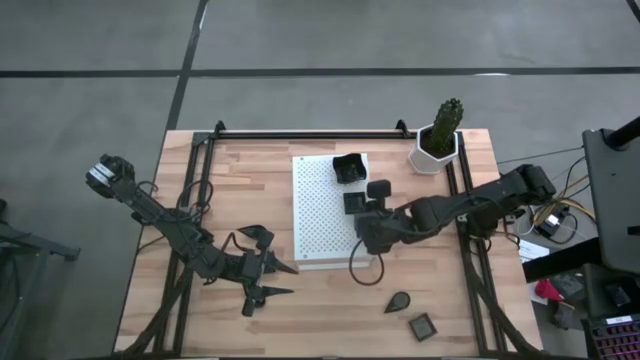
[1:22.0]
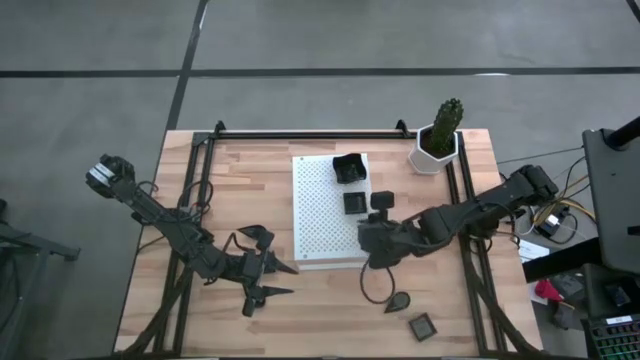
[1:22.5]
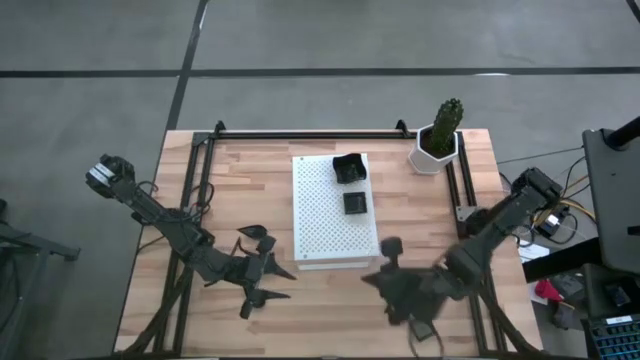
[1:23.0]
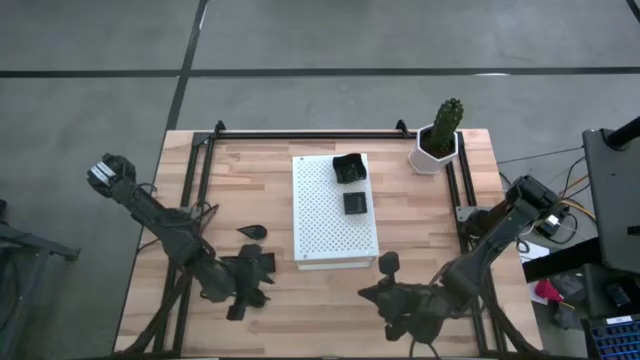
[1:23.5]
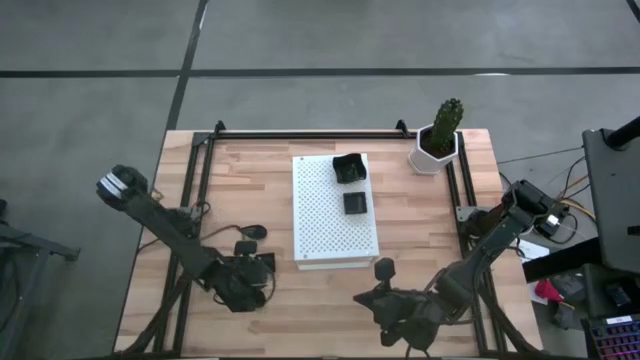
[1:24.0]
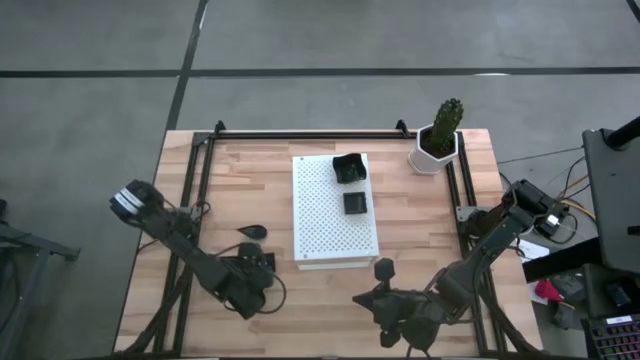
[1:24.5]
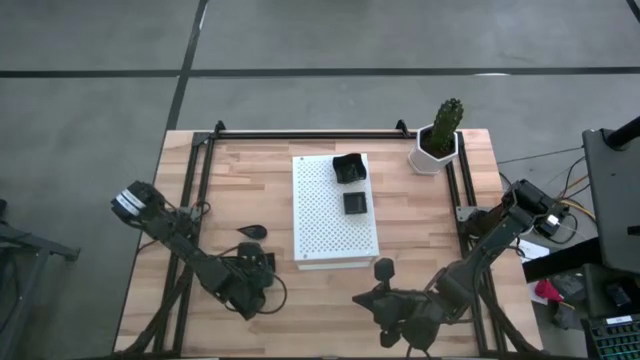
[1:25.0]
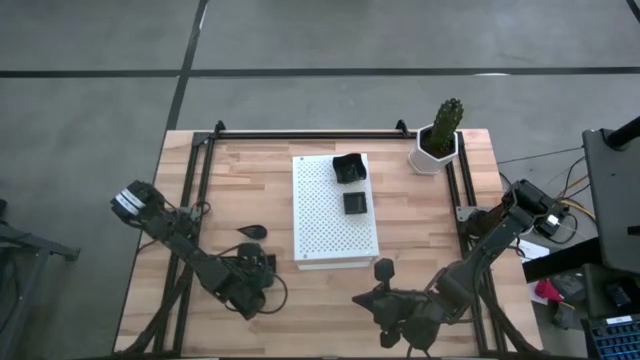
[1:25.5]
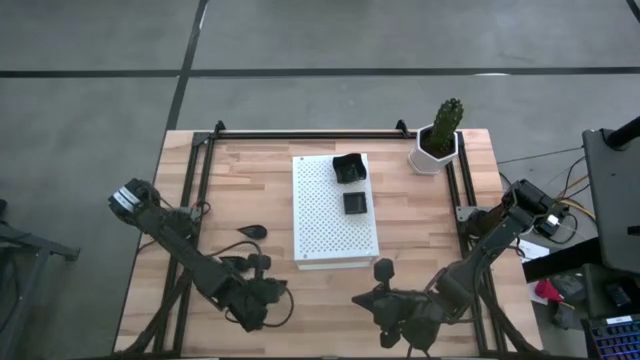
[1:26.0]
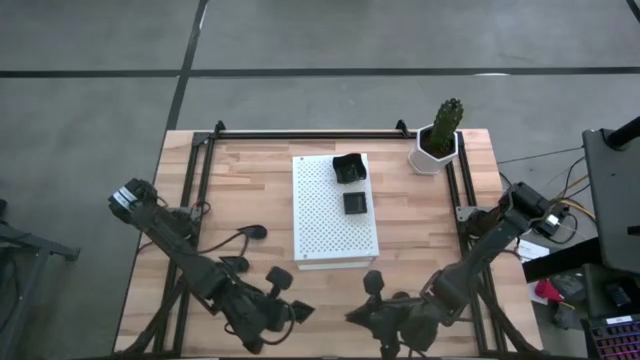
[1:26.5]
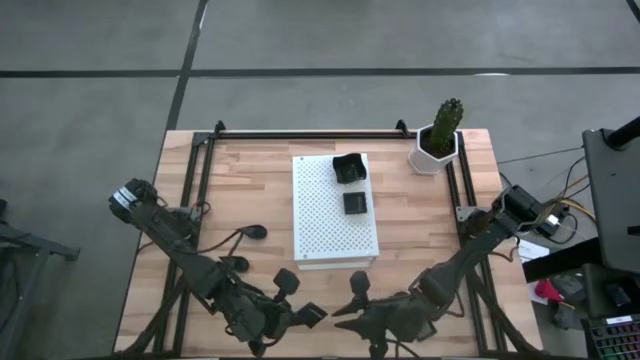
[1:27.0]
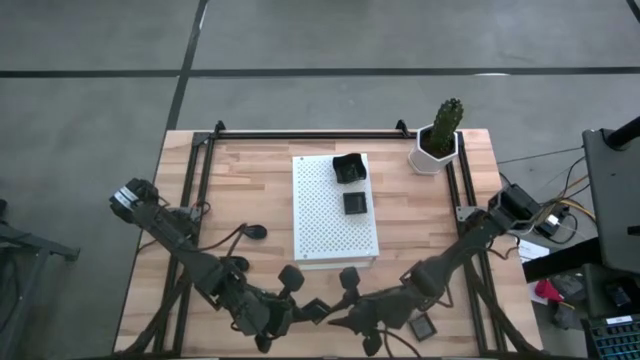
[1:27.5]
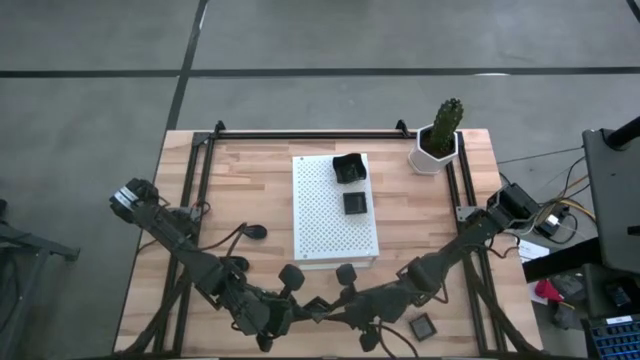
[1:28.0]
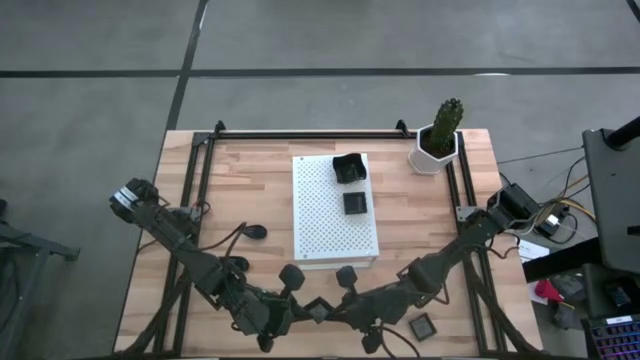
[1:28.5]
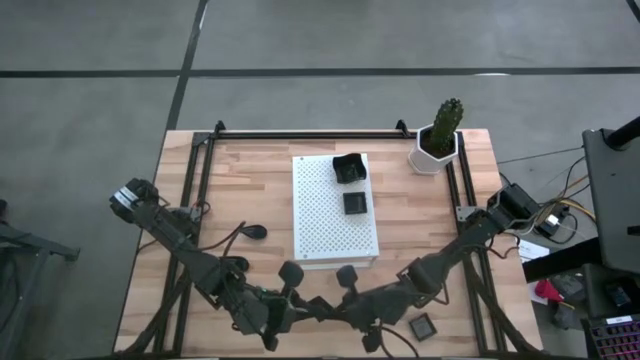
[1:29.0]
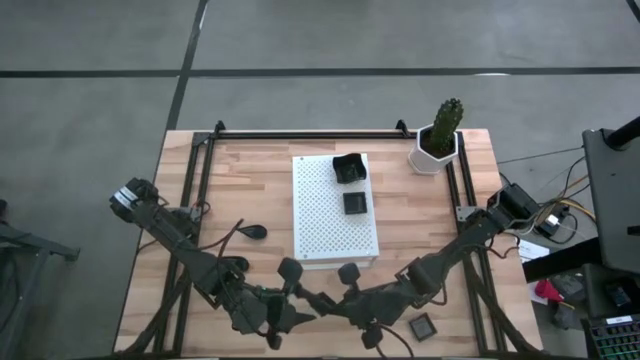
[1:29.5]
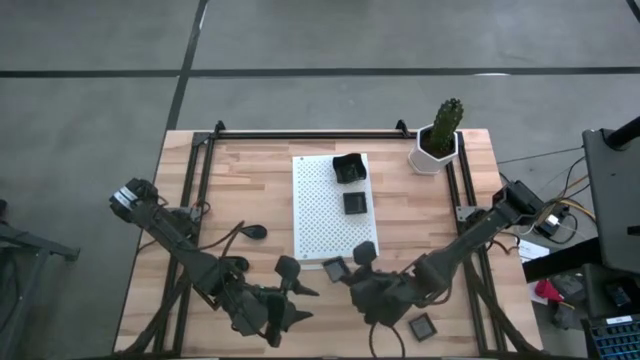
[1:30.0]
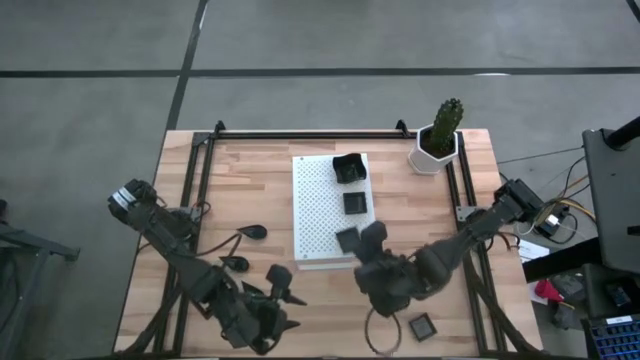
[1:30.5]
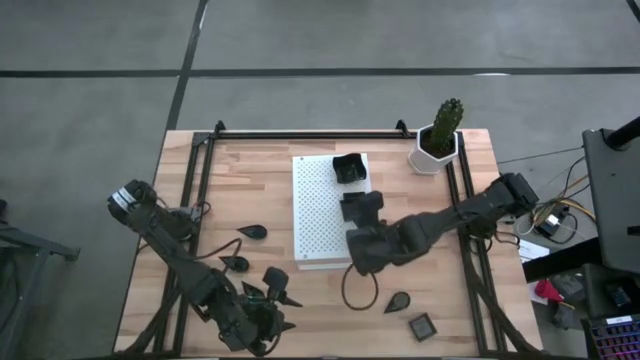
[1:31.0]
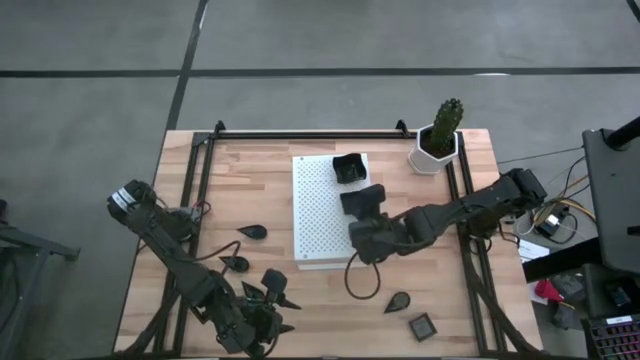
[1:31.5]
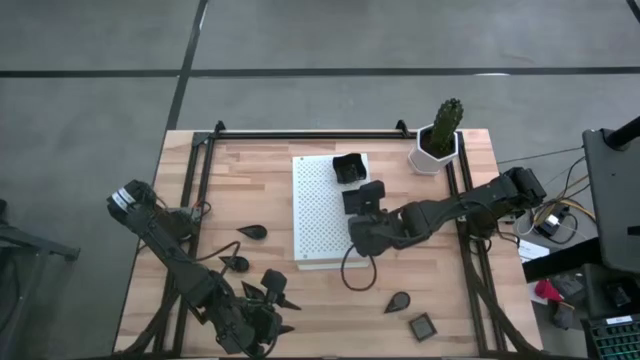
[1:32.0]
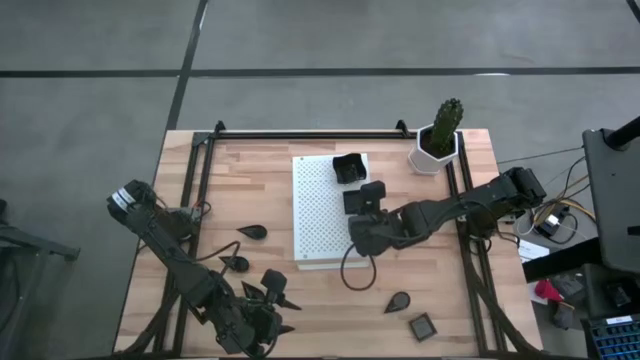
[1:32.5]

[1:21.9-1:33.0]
Task: Pick & Place Mini shaped plates
Stack the black square plate on top of the black square plate on the shelf

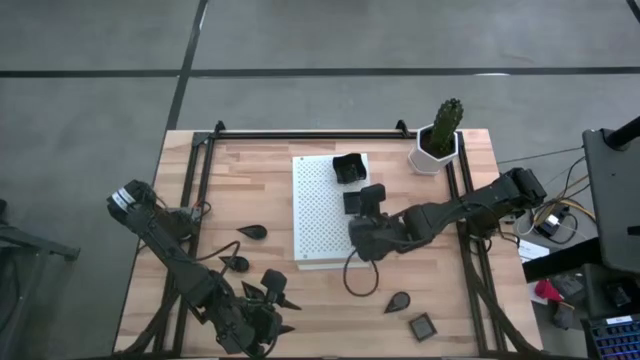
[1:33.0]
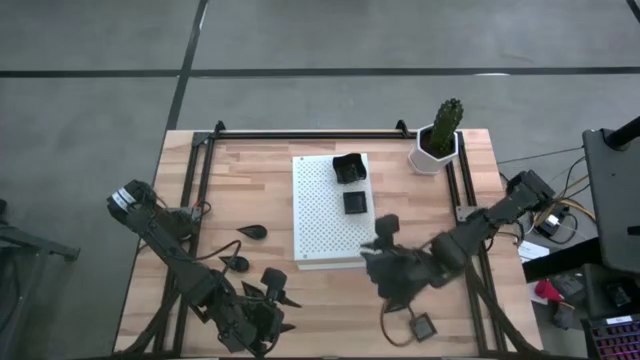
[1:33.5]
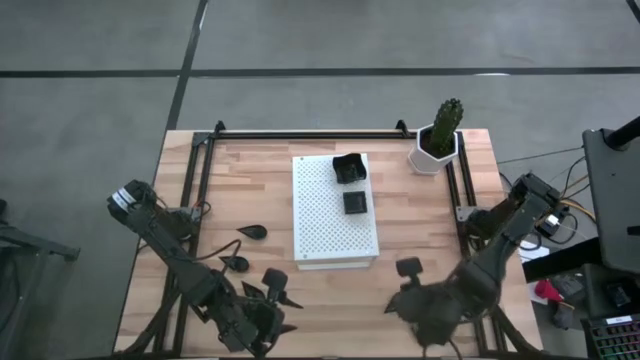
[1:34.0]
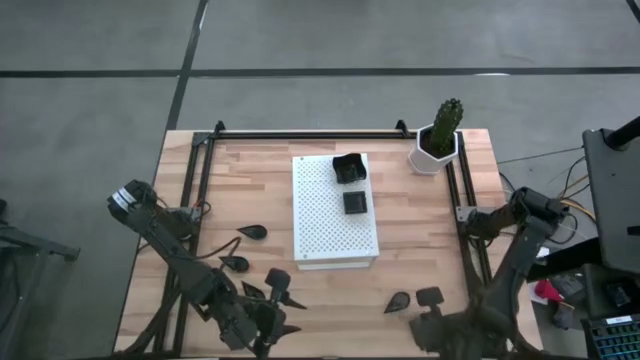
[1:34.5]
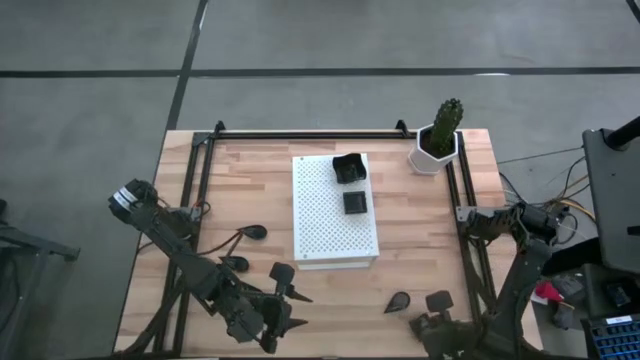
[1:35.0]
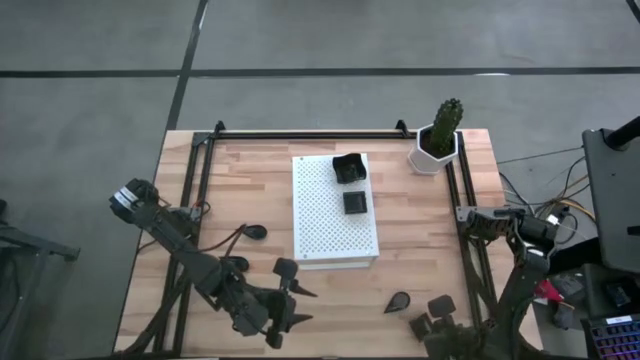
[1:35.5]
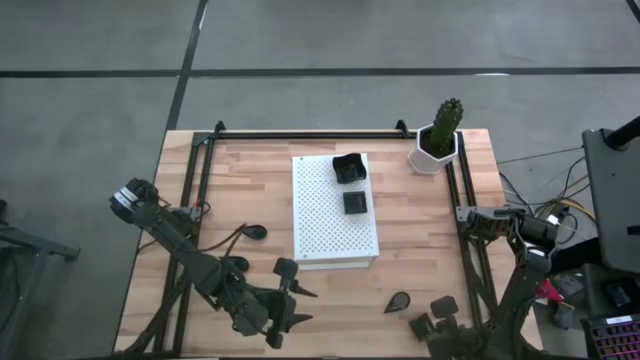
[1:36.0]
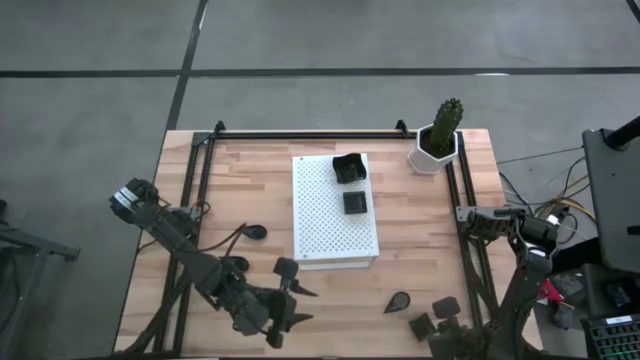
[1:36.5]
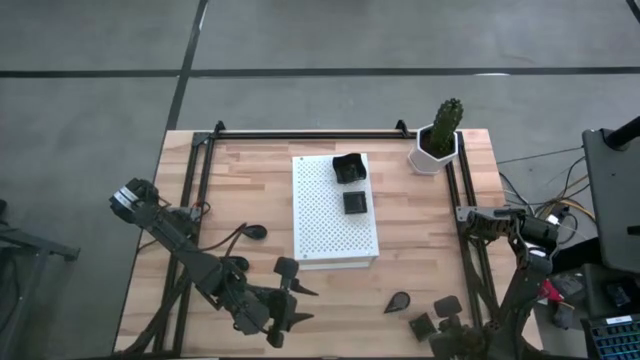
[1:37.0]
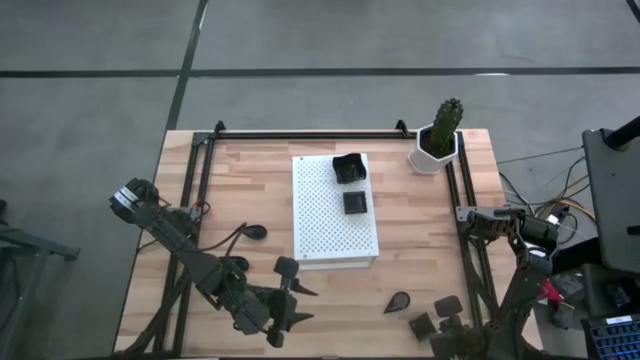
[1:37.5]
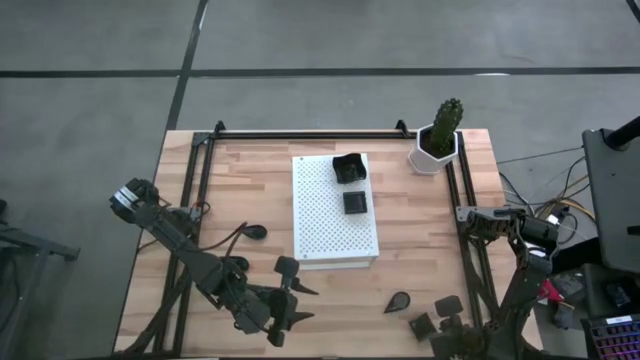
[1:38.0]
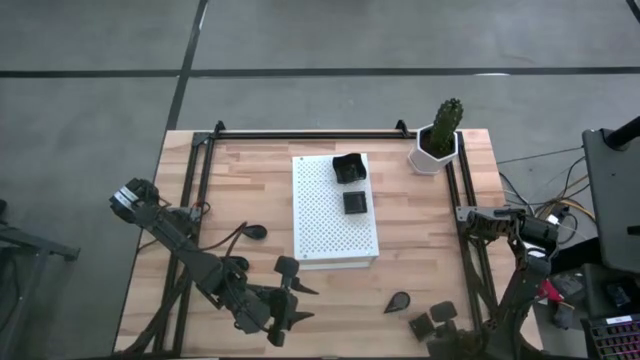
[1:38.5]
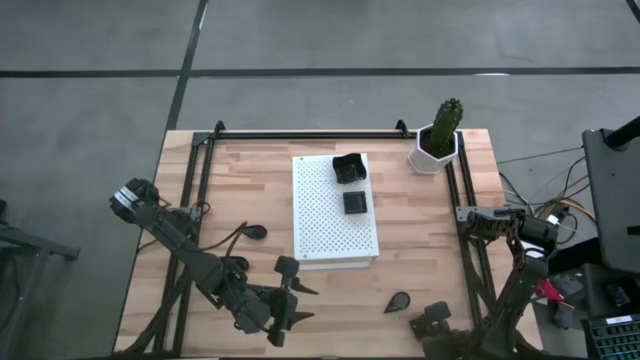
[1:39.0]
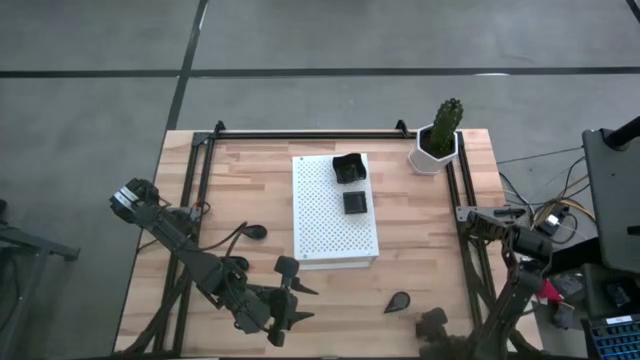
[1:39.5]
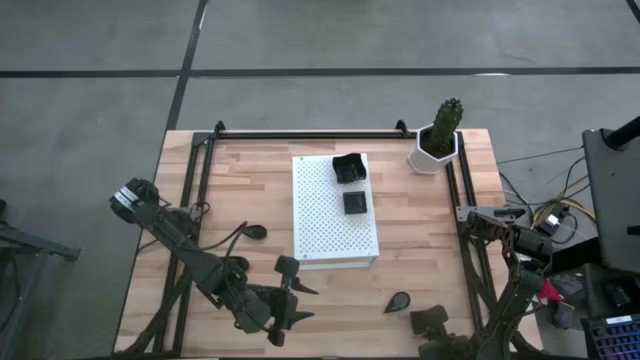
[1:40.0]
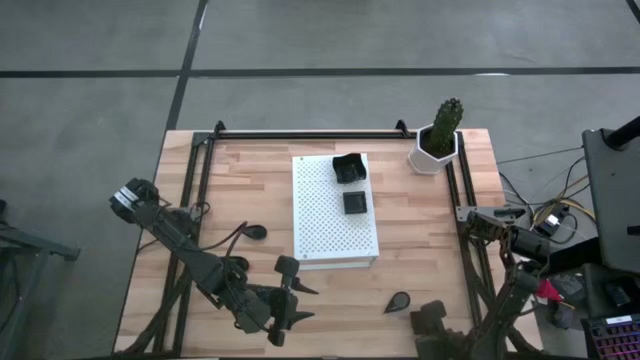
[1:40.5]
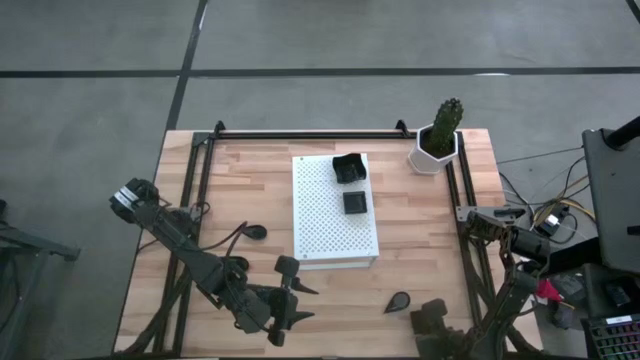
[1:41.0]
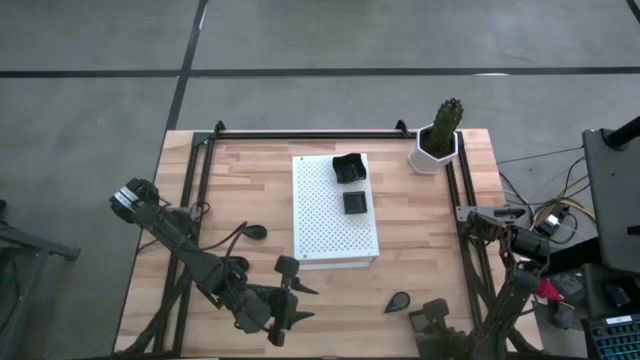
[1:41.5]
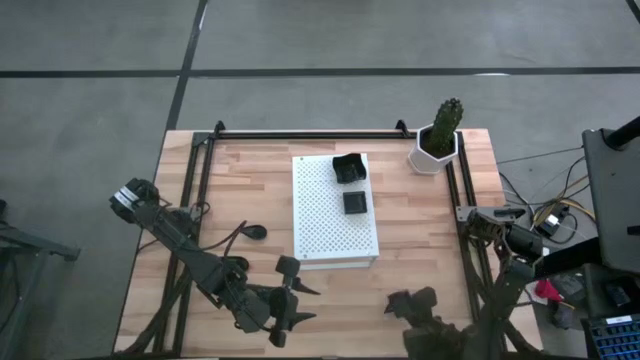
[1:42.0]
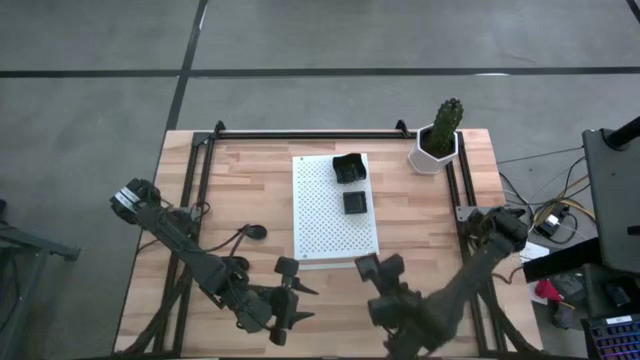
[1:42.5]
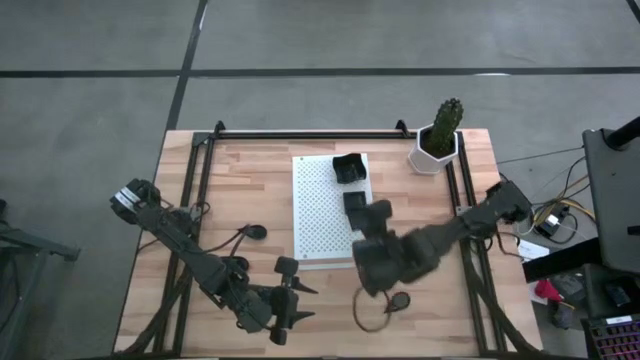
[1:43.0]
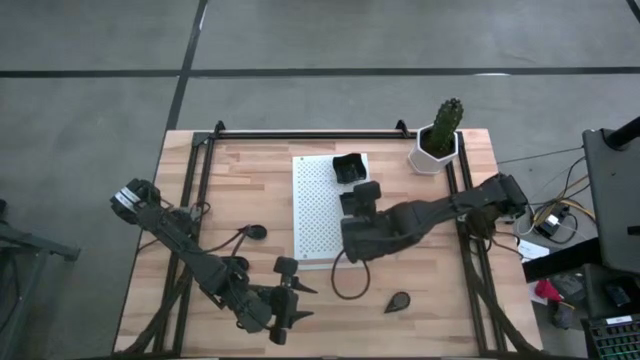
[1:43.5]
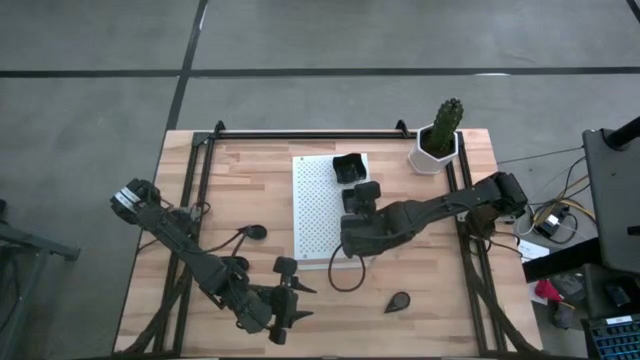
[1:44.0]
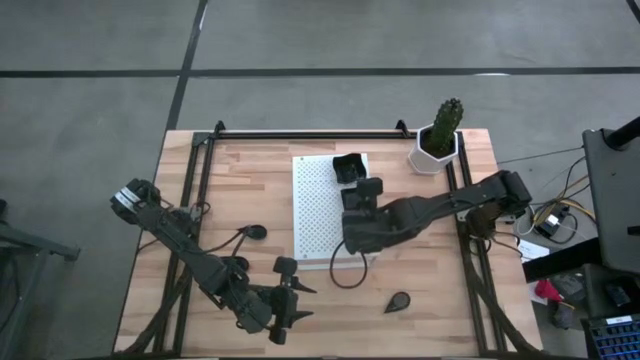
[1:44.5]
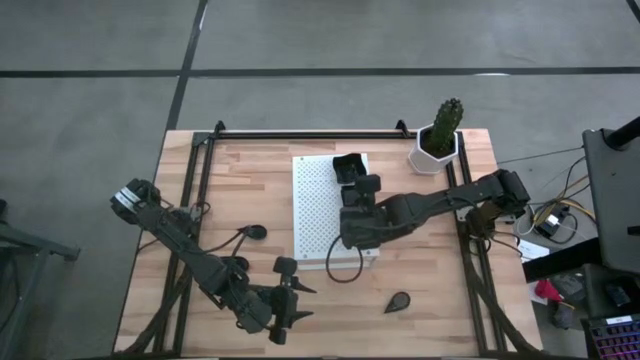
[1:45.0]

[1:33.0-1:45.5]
Stack the black square plate on top of the black square plate on the shelf
